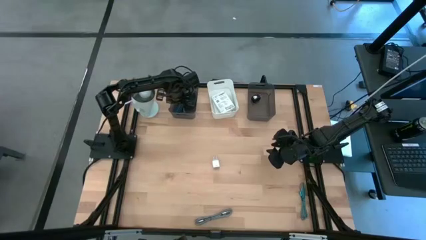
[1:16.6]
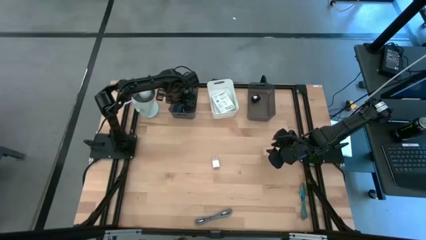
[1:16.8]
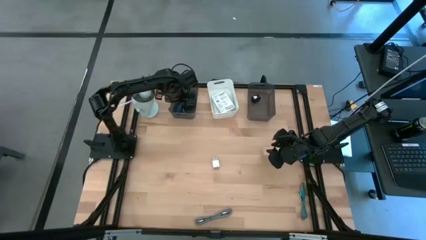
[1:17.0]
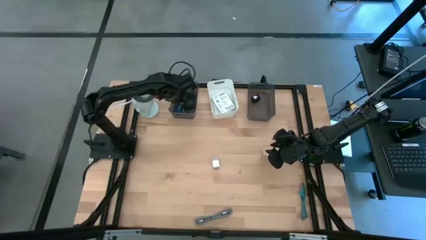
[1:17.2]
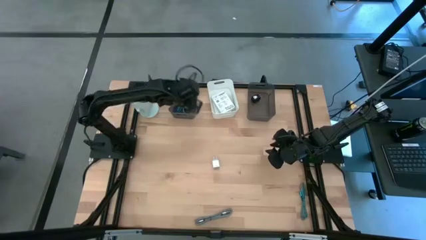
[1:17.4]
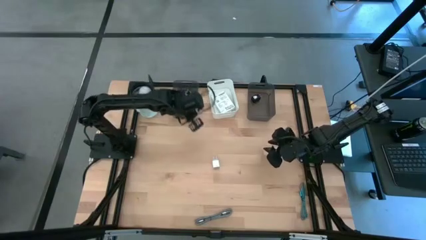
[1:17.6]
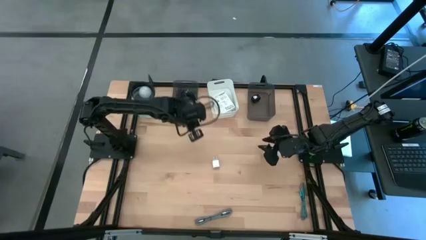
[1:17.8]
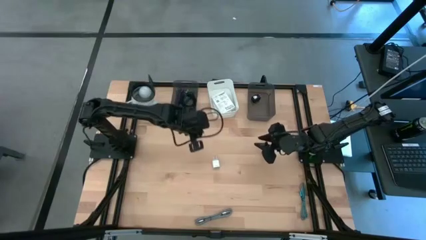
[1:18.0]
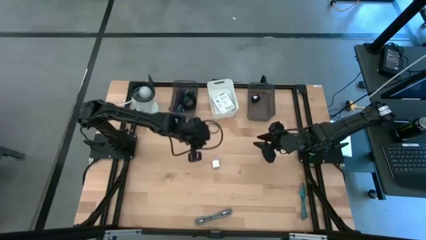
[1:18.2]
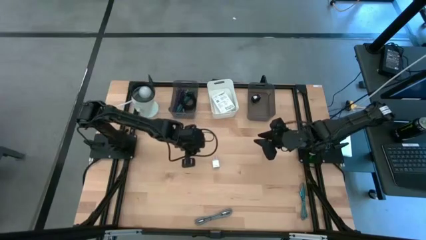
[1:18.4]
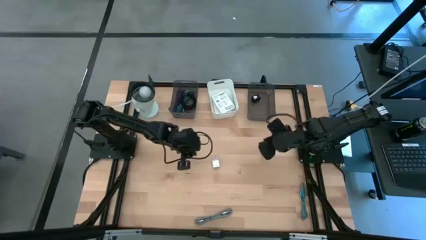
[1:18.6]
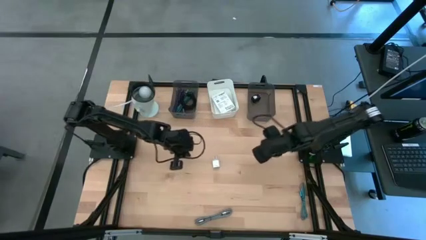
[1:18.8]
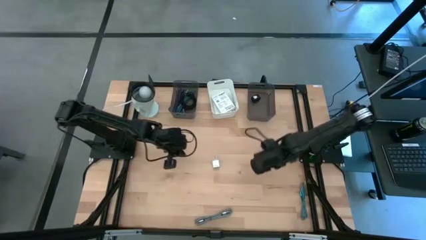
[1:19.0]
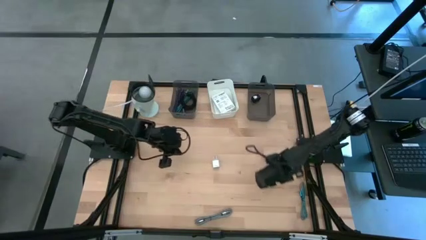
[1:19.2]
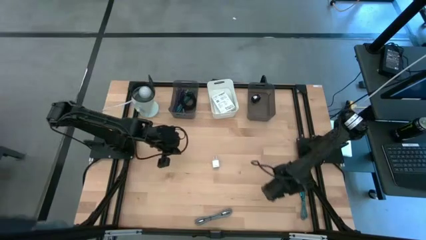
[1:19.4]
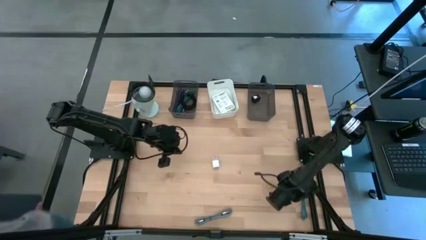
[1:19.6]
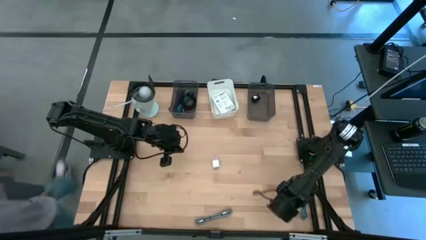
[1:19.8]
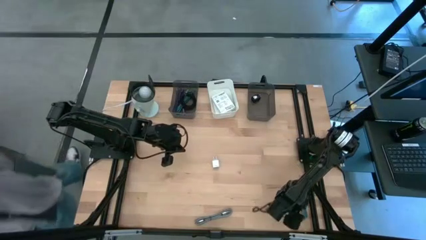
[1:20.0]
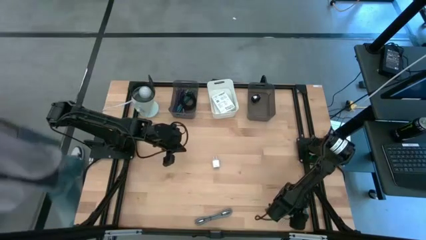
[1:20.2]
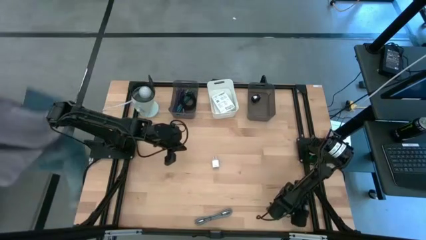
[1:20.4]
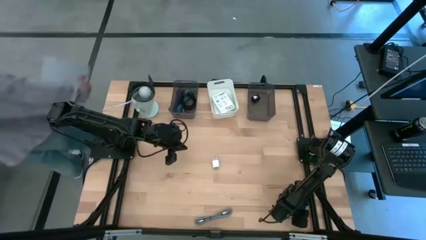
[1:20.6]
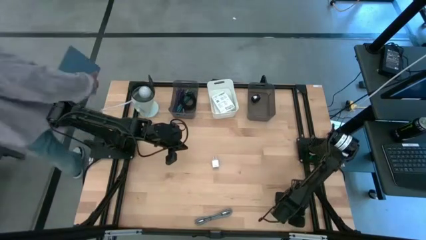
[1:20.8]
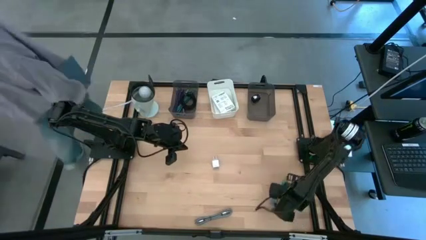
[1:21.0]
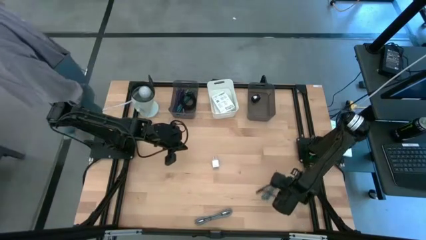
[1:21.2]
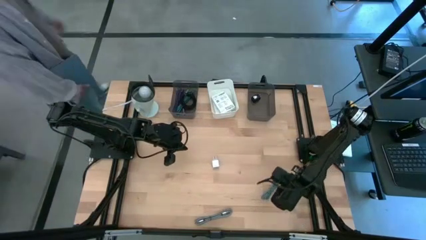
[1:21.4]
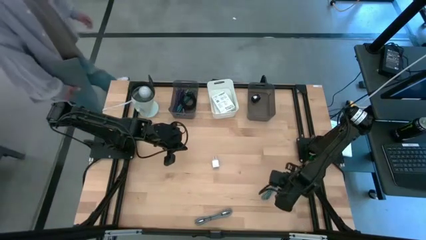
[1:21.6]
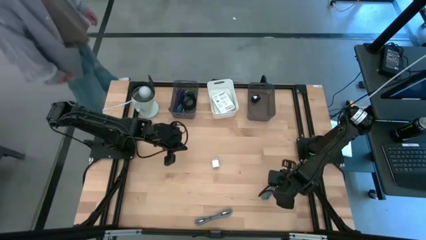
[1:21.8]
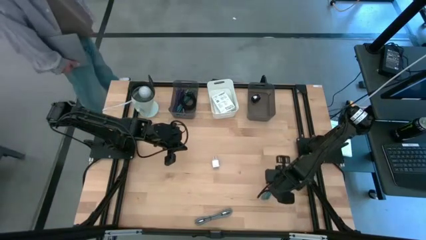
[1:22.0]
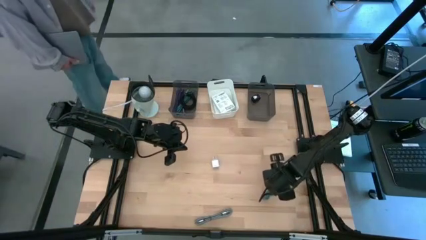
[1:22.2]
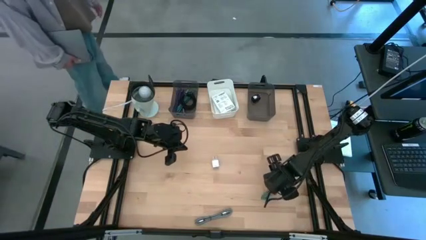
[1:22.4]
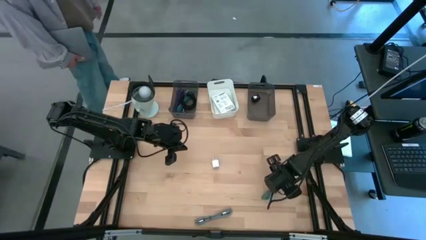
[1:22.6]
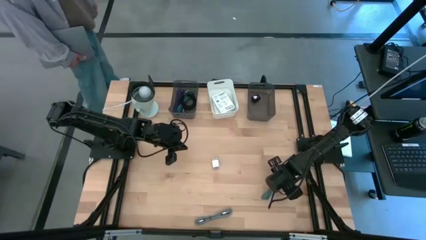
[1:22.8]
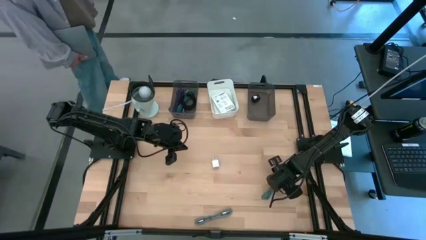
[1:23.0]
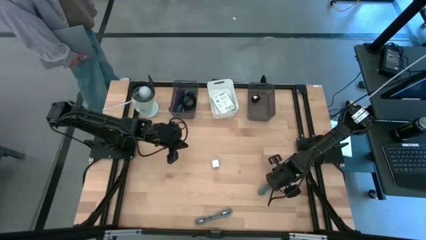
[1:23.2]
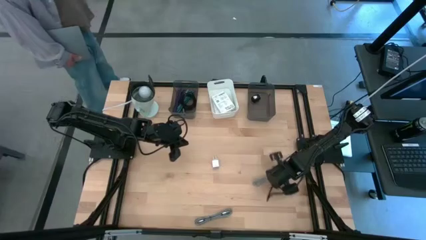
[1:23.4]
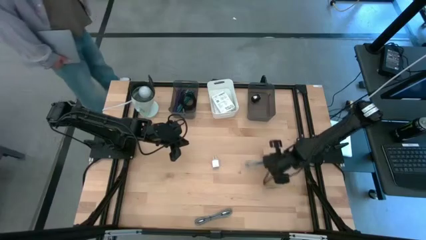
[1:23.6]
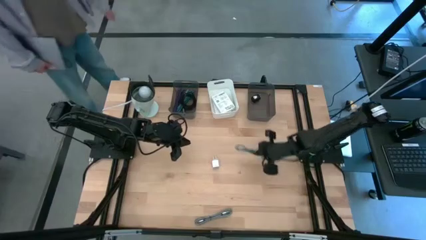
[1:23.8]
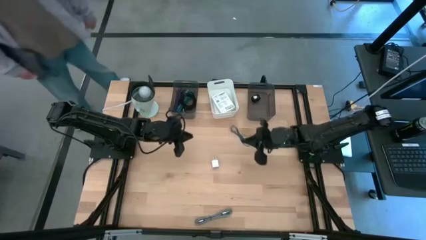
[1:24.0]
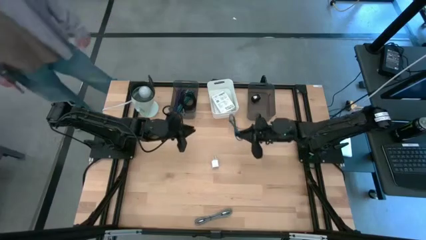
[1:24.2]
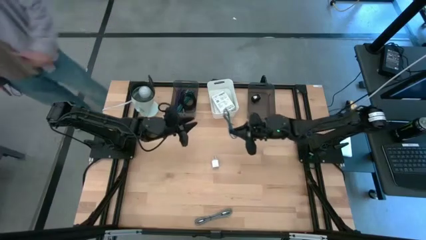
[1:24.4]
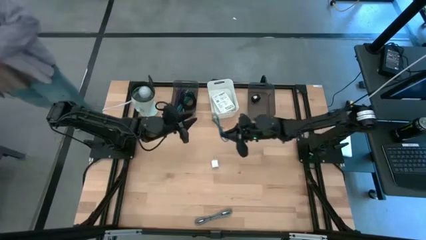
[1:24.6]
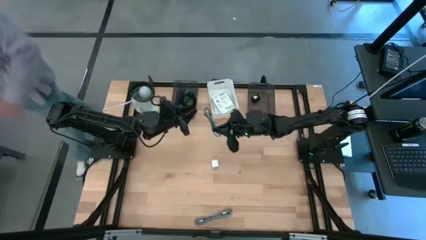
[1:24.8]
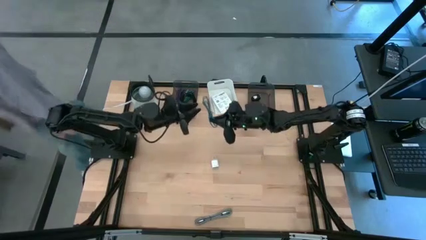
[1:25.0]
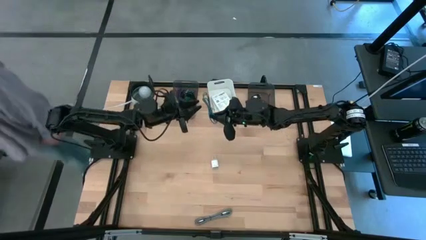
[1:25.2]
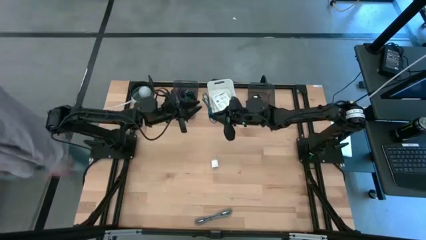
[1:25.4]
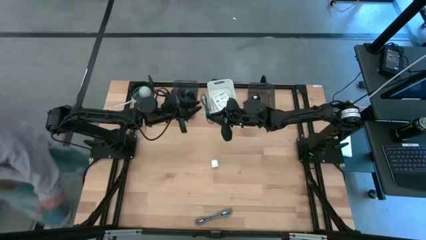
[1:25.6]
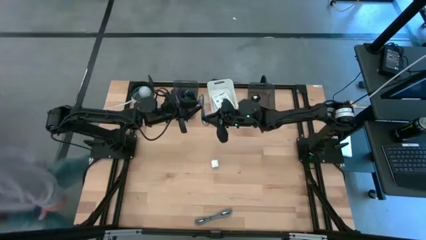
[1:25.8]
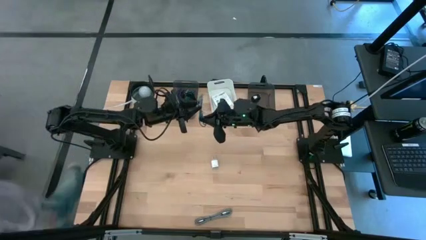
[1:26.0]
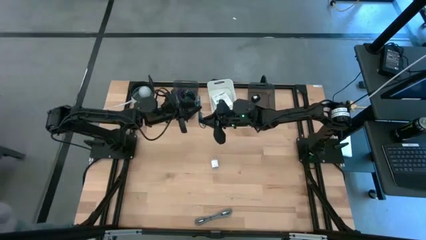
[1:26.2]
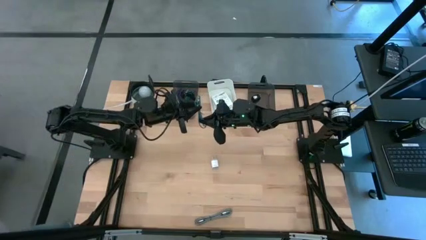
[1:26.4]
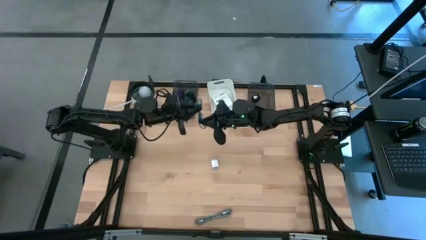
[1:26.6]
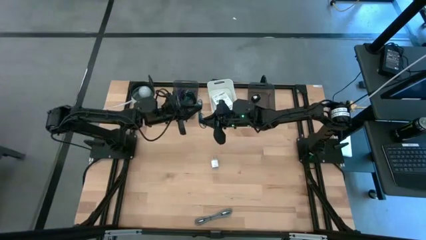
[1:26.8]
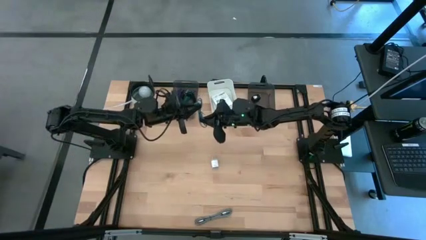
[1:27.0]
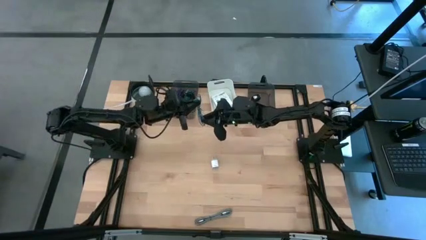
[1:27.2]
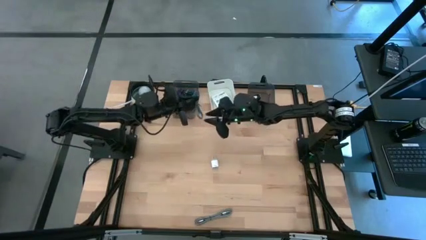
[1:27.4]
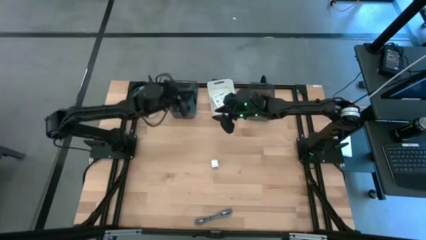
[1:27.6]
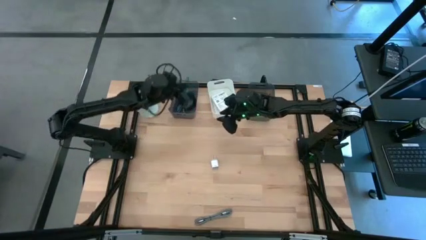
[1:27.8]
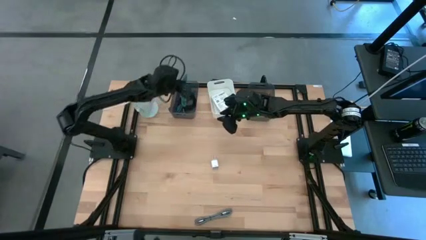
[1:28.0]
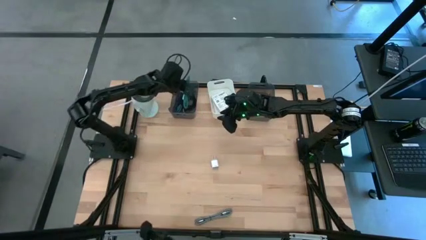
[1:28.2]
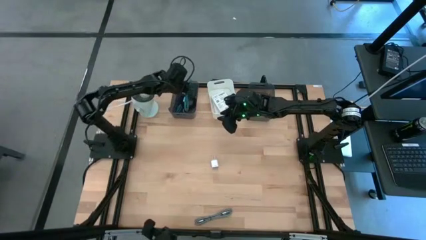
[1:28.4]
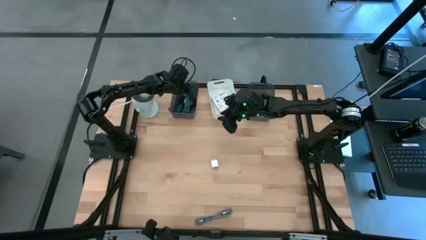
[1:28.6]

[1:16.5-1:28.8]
Task: Pick and place items into bin
Put the blue charger cable into the left black bin

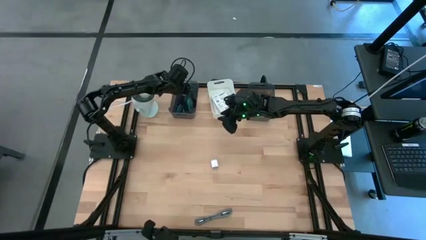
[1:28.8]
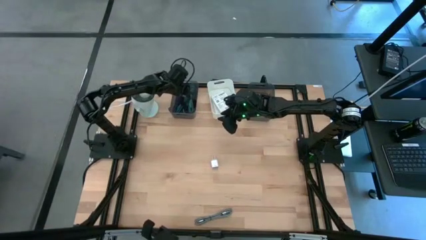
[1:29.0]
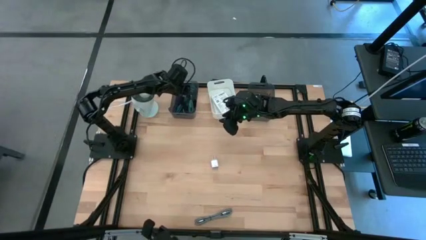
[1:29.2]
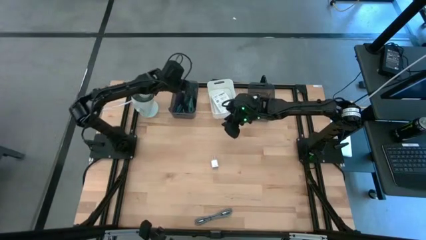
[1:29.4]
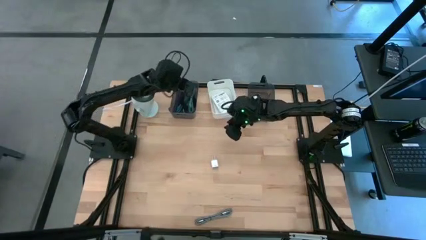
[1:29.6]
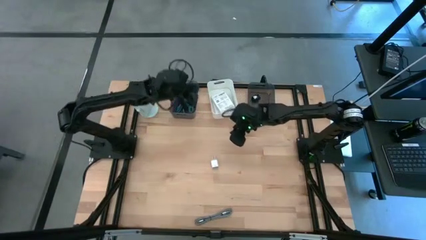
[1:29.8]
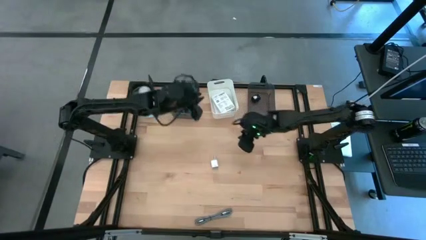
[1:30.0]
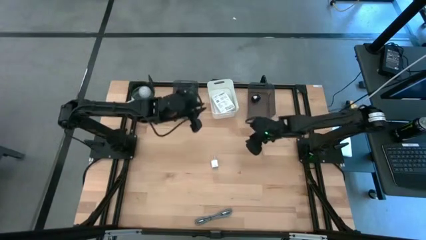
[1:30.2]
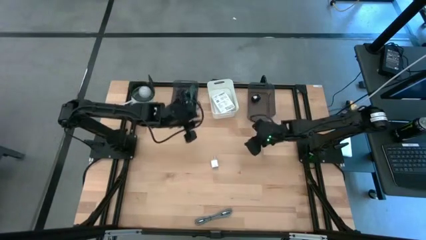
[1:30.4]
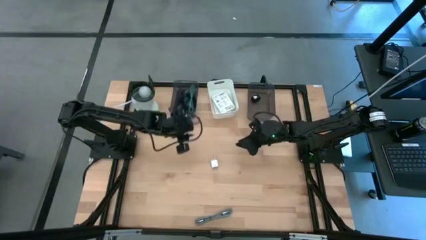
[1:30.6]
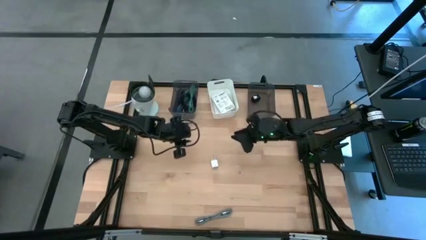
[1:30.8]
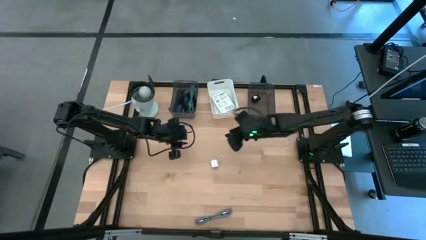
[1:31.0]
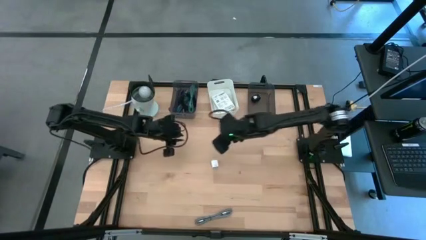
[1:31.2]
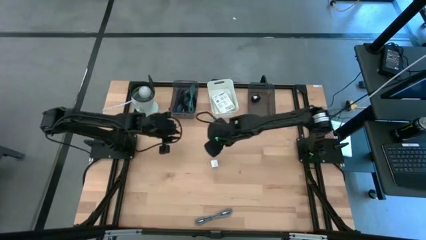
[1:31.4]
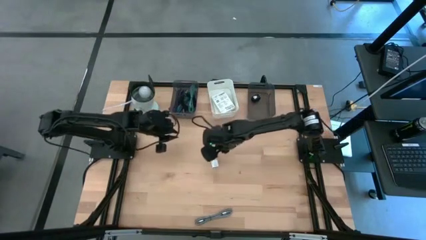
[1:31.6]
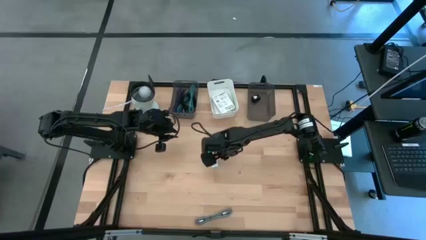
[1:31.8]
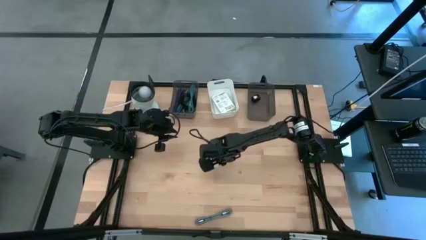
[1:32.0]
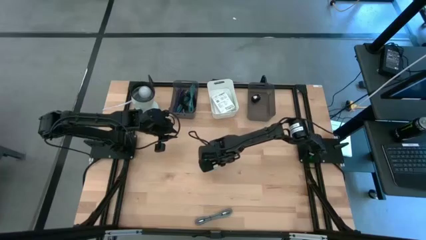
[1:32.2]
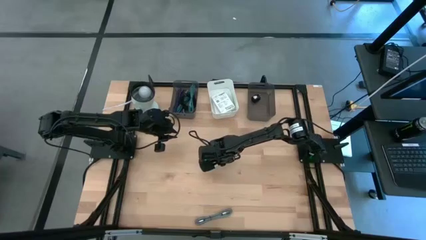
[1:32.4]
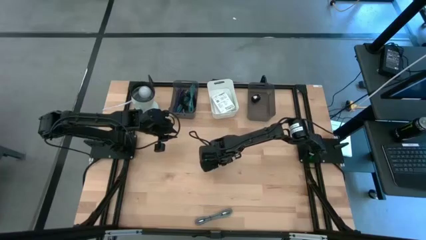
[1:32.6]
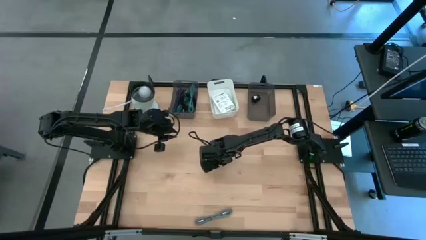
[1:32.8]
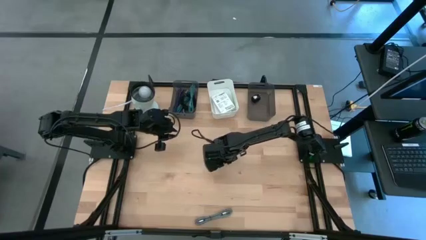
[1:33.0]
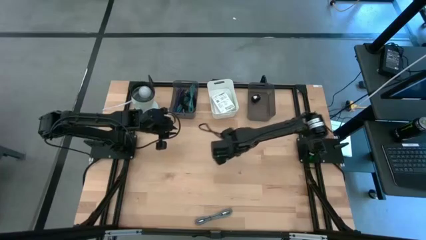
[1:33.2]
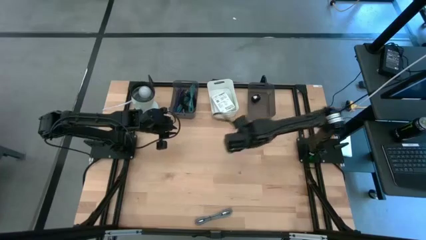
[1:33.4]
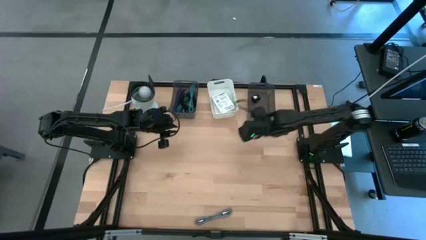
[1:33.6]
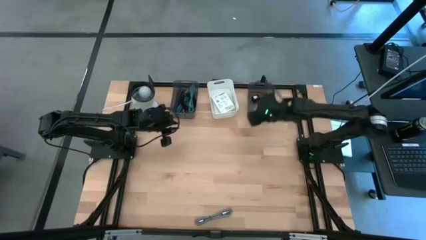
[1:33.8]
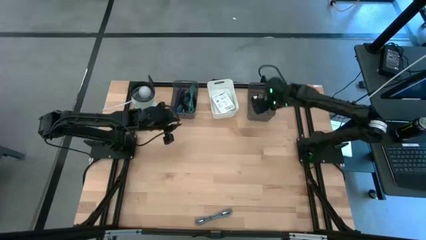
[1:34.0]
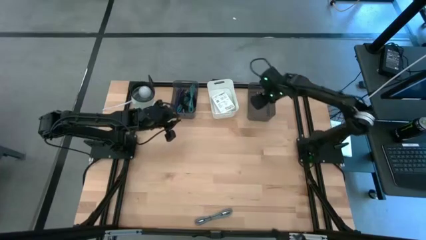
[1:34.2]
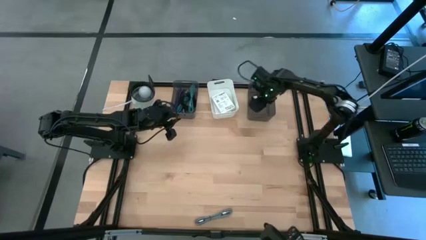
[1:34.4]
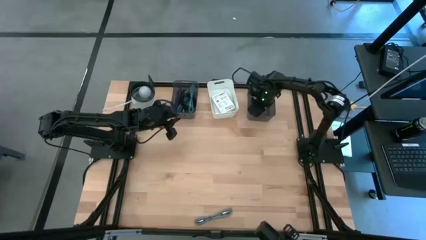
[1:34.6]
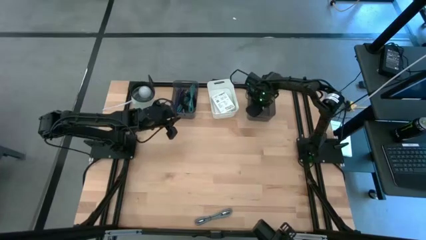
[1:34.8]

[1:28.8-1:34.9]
Put the white charger adapter into the right black bin
